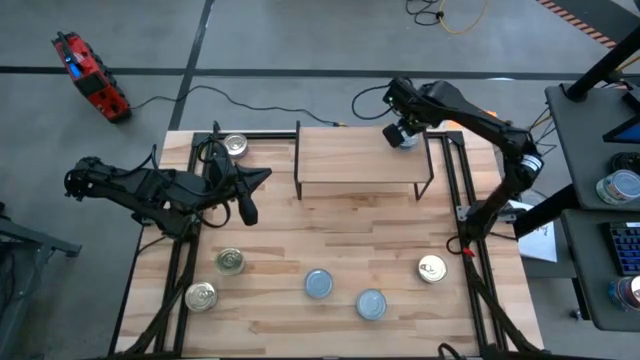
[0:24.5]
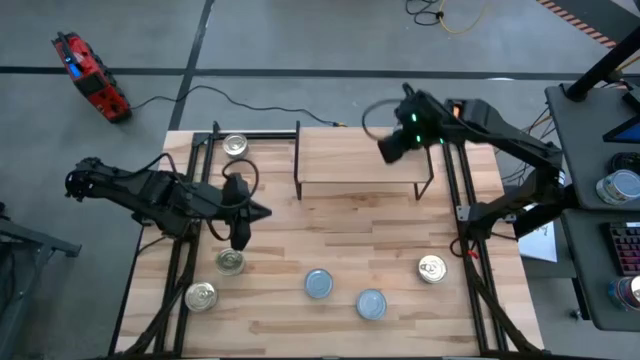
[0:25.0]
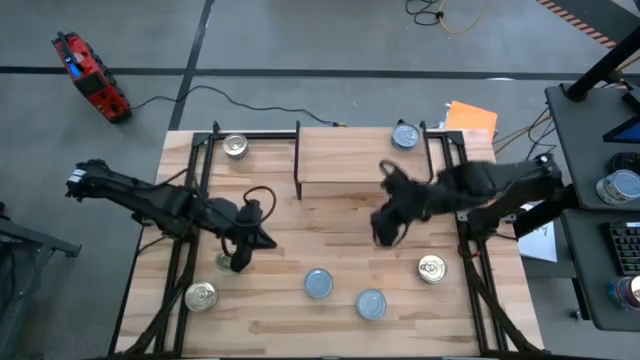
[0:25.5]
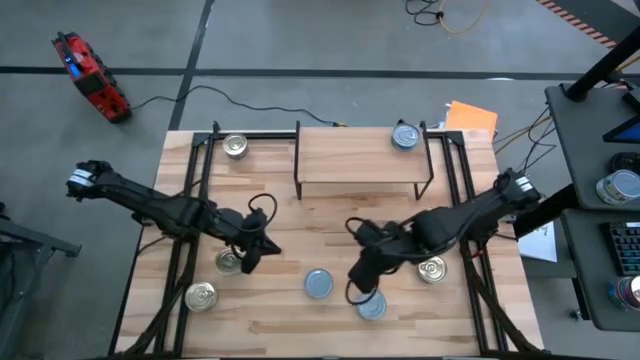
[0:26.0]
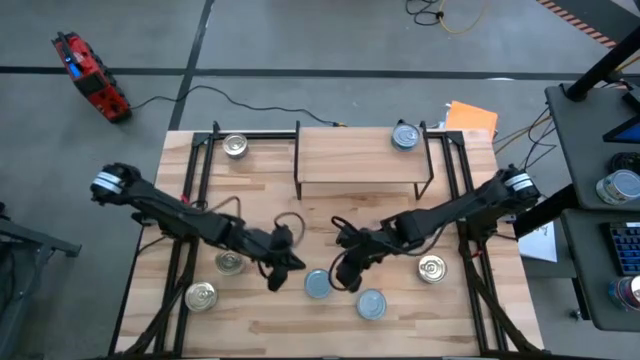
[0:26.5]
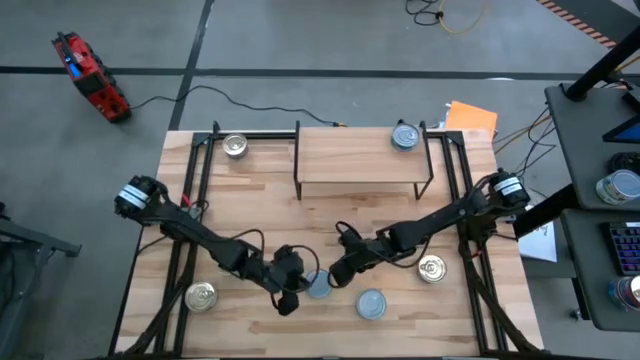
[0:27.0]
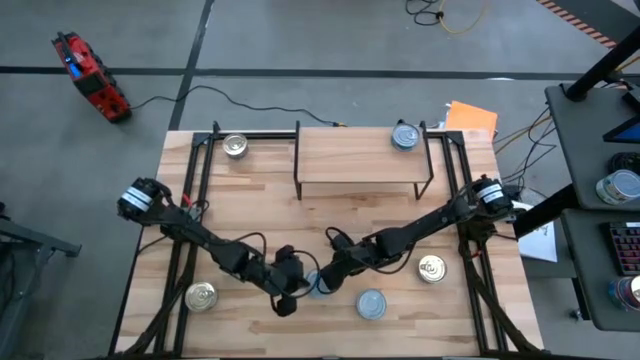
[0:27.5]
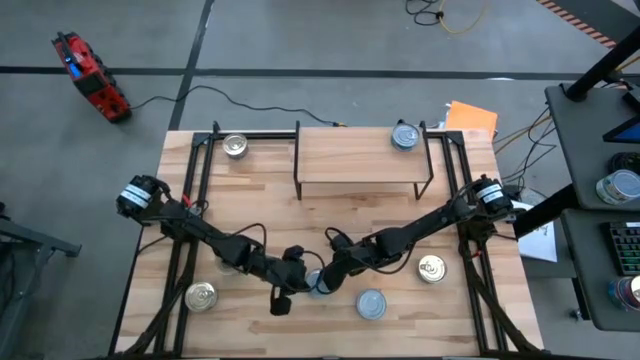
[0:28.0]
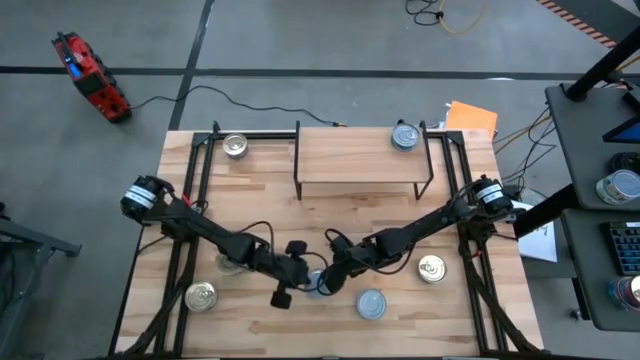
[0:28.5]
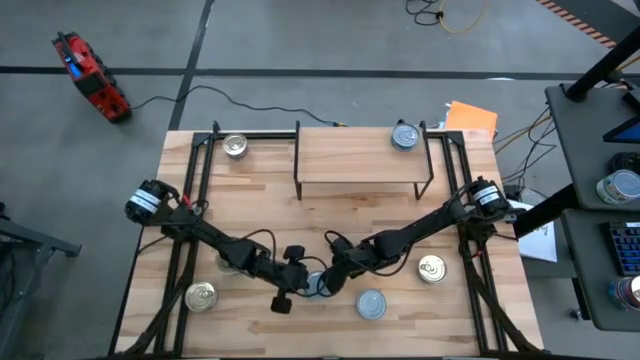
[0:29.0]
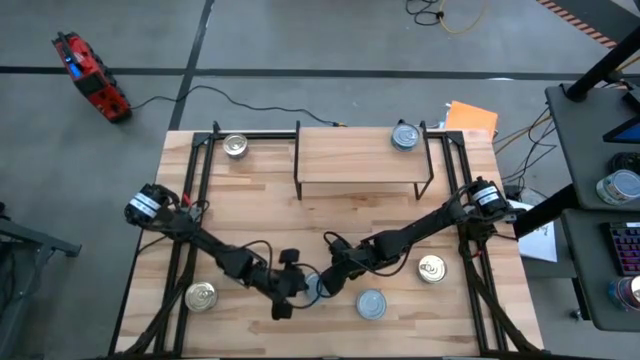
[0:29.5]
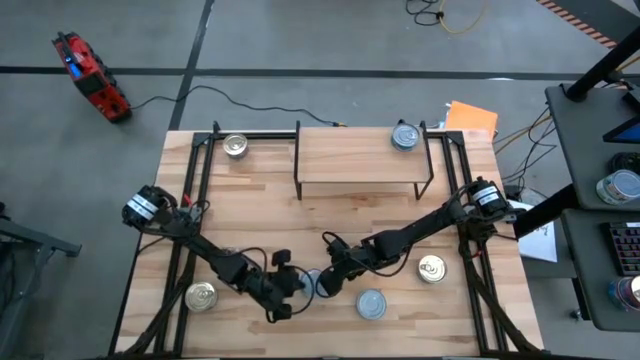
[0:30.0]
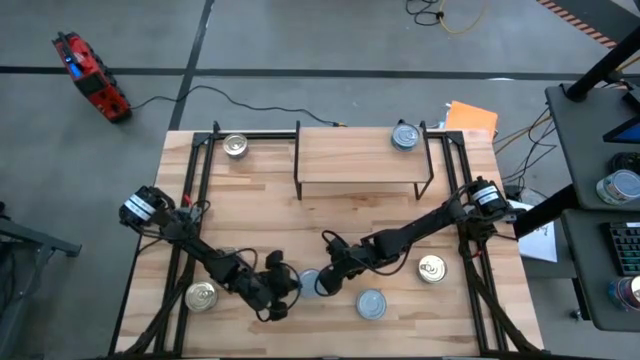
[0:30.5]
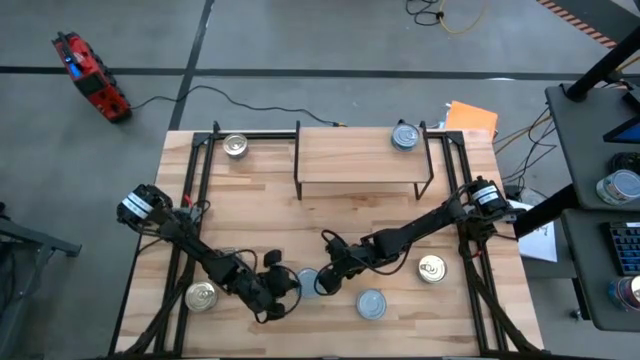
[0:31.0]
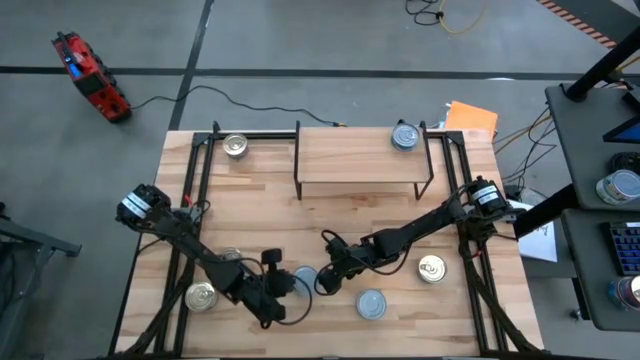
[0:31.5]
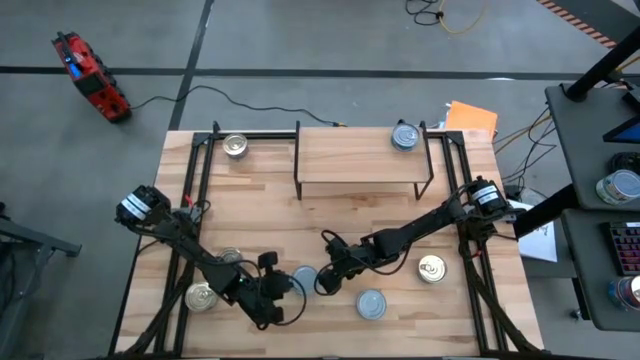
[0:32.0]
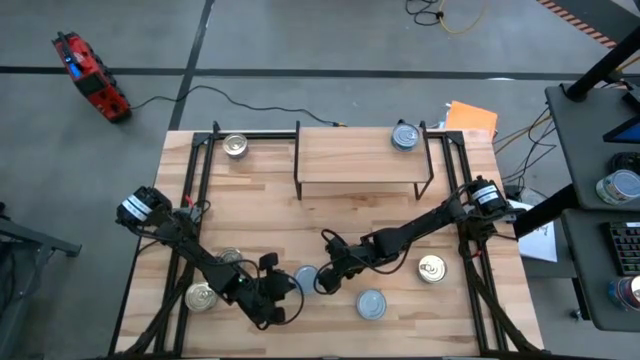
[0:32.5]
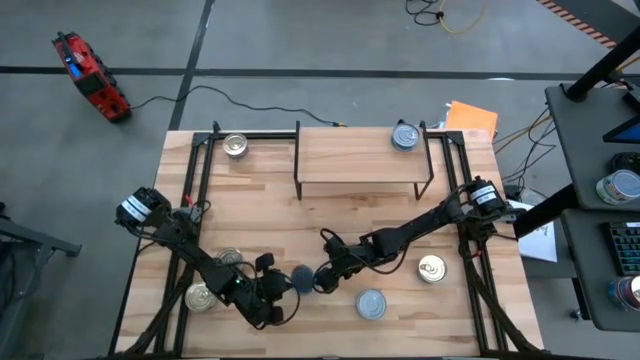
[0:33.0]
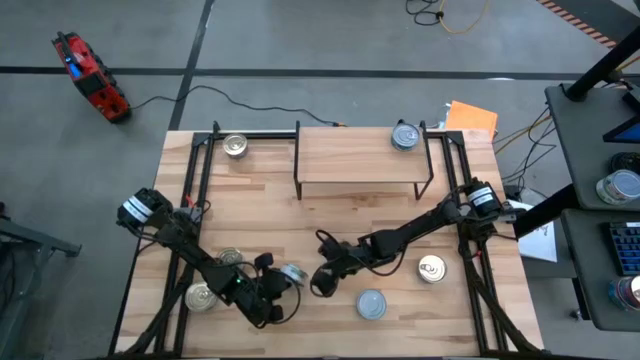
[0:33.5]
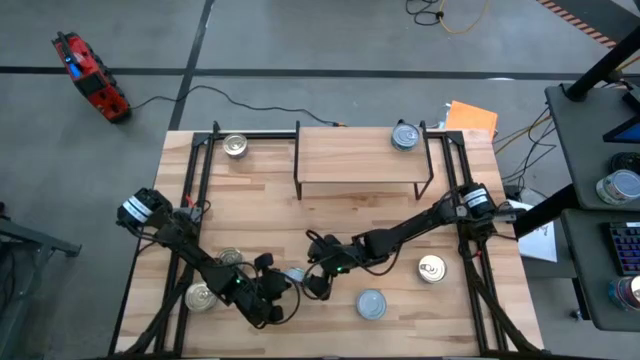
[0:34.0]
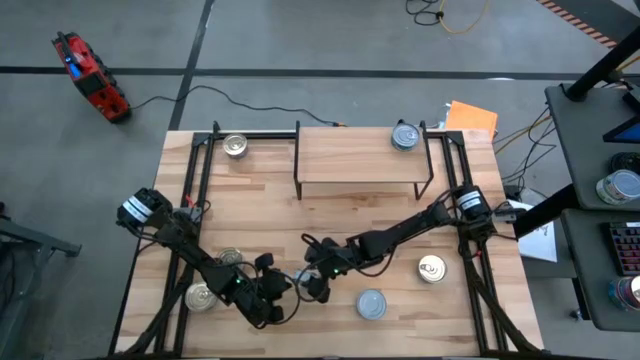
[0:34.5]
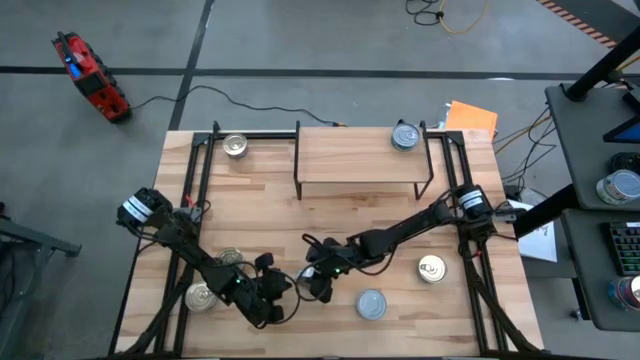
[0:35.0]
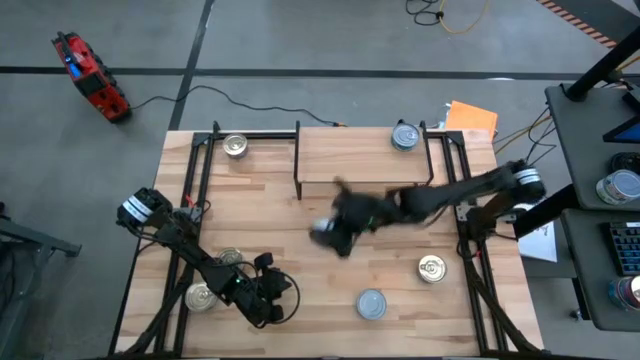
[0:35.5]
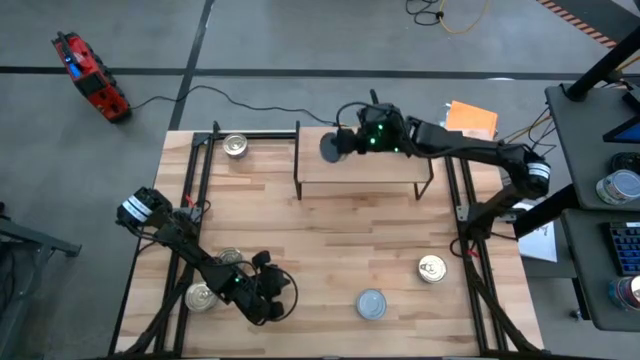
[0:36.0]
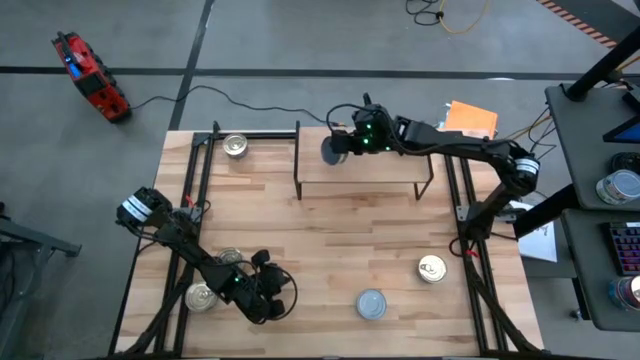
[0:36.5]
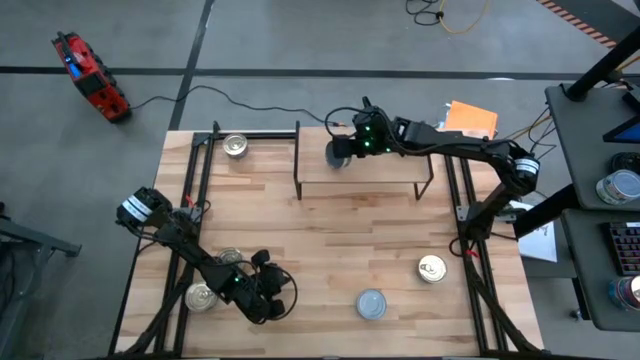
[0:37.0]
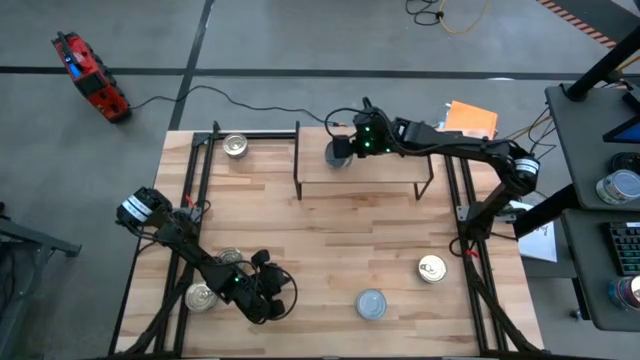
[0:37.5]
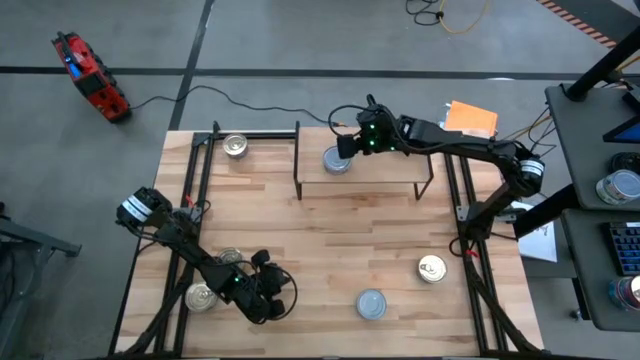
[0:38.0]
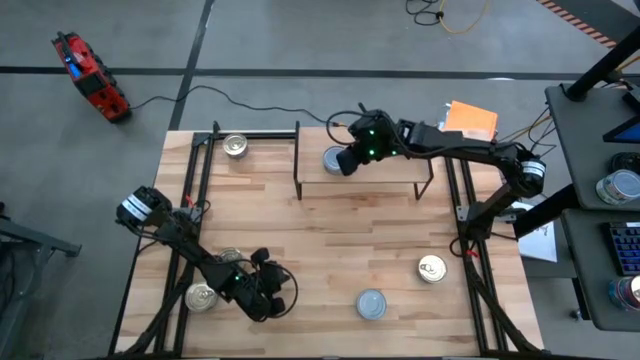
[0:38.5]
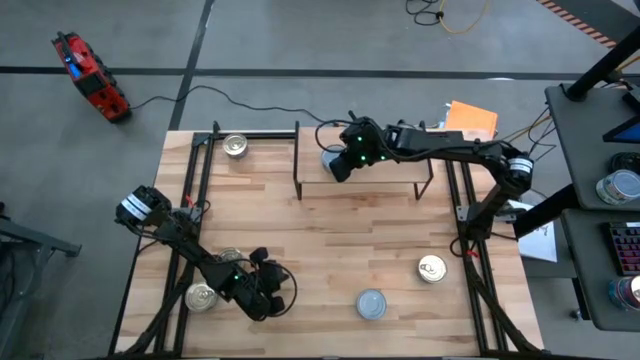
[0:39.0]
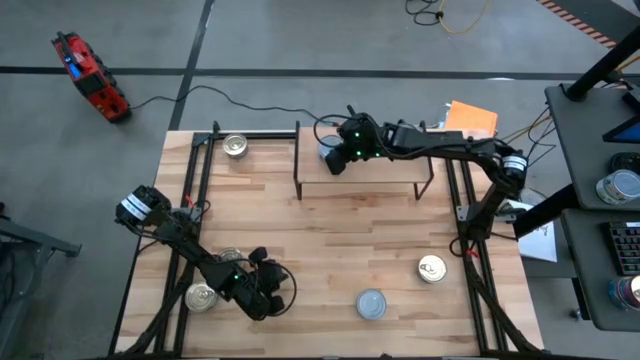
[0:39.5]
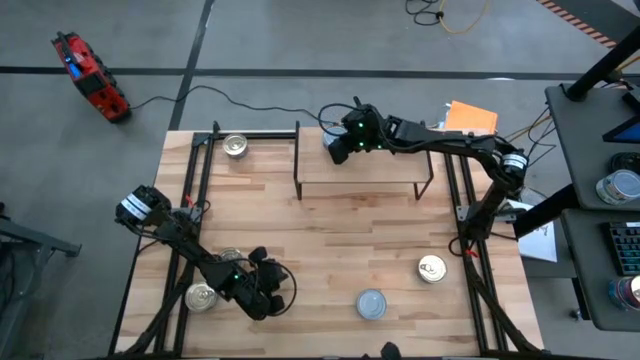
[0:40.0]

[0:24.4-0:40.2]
Task: Stack canned seafood by type on shelf
Put the green tuna can on the shelf

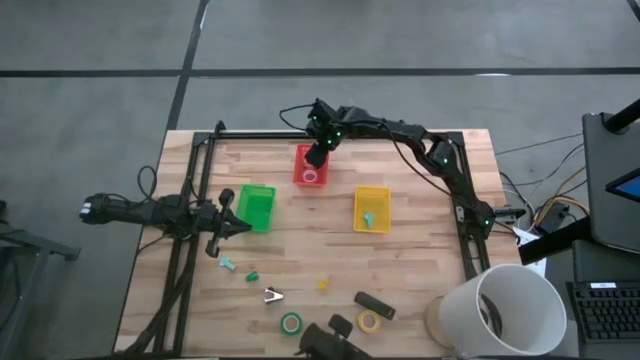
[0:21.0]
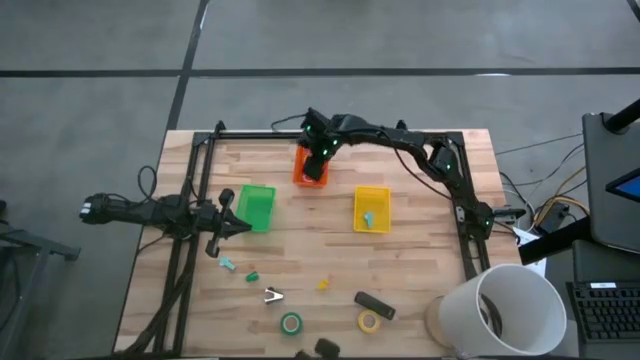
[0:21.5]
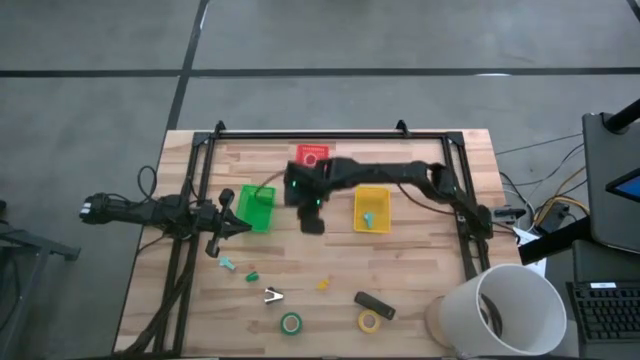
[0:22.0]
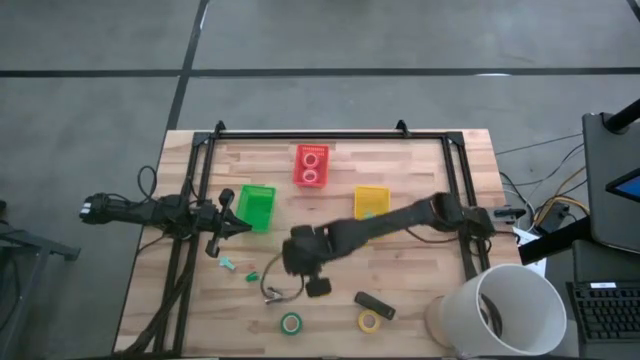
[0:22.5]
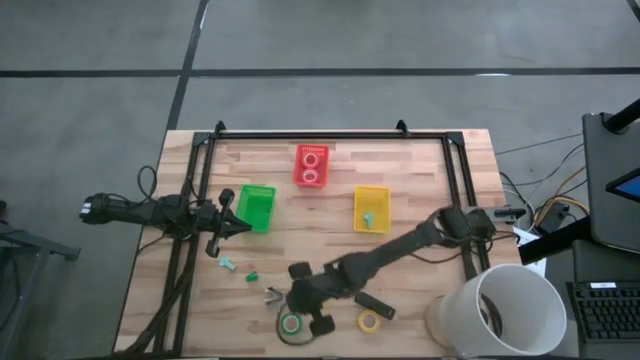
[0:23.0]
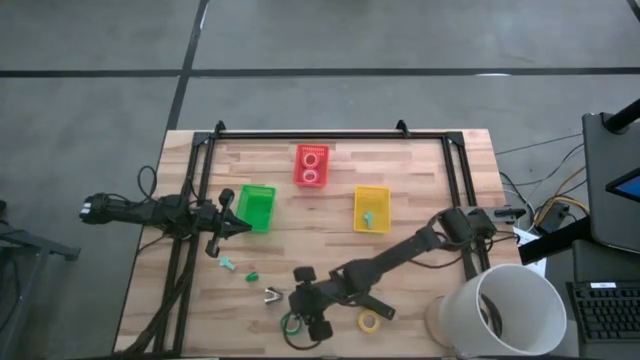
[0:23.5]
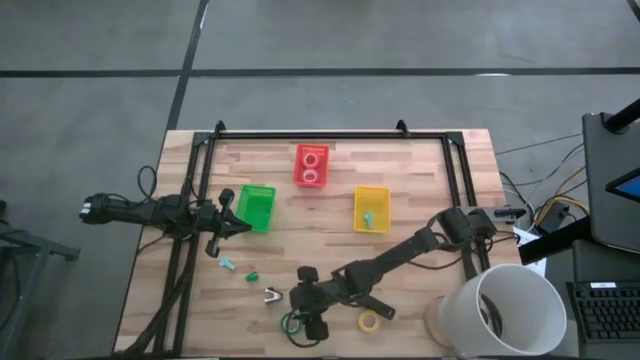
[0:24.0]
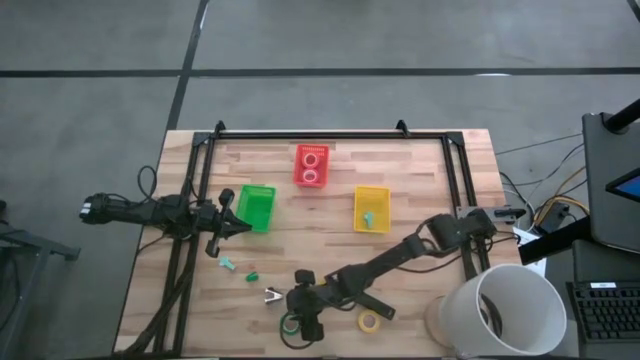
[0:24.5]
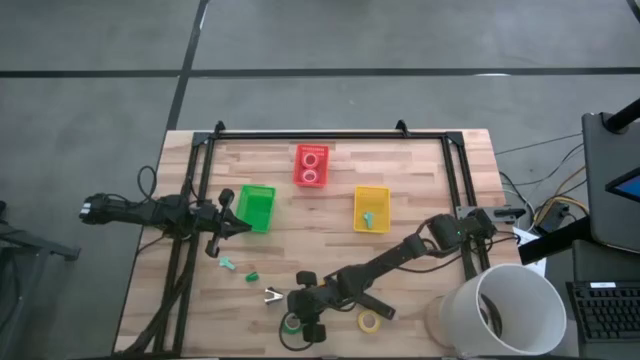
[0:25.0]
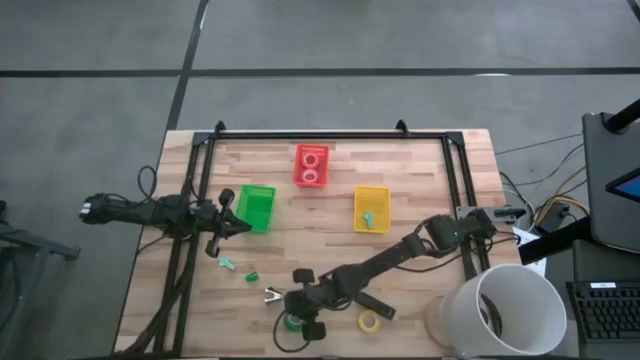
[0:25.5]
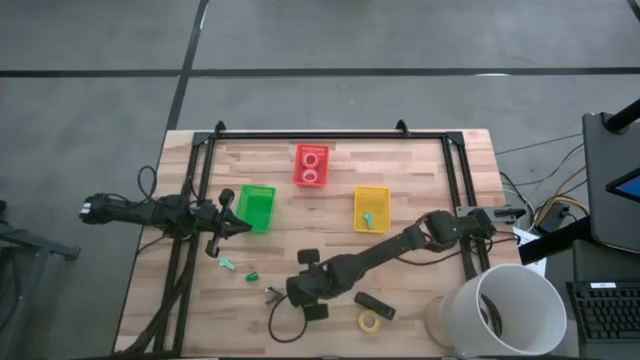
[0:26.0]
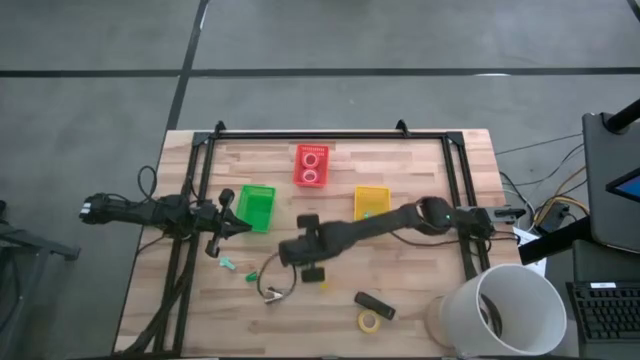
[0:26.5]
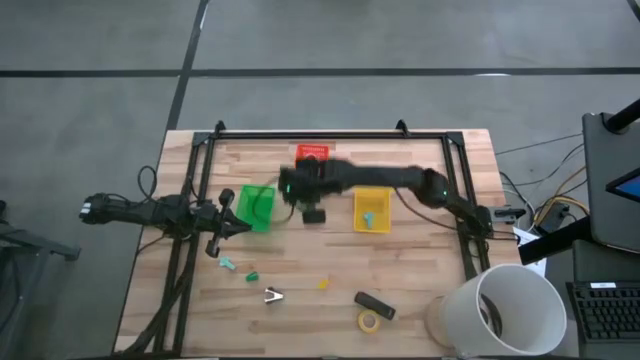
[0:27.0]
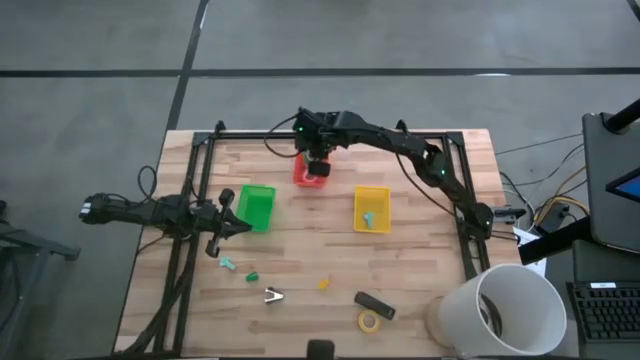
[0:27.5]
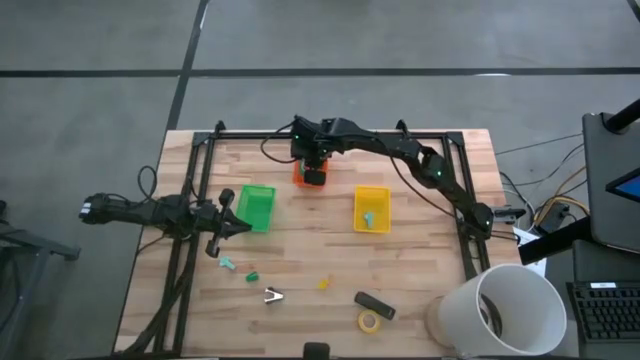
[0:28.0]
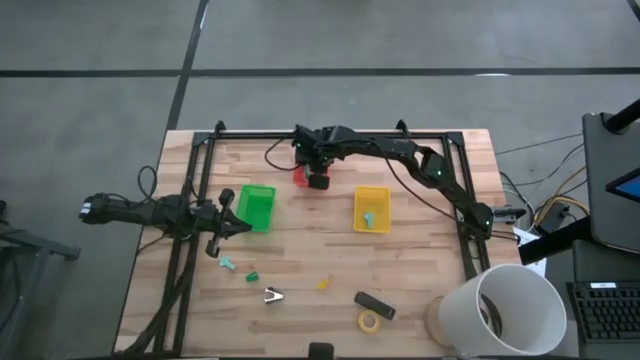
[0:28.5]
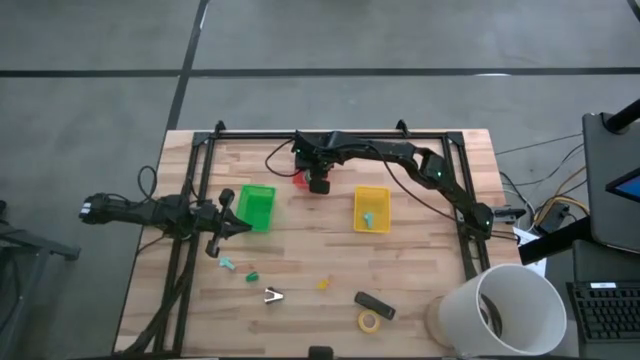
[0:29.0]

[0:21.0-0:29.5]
Task: Pick and place Stapler, Stapler remover, tape
Put the green tape into the orange basket
